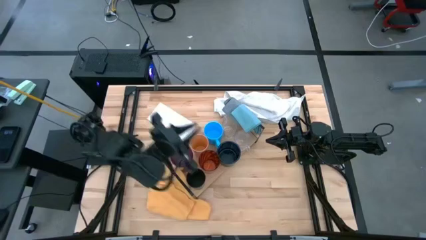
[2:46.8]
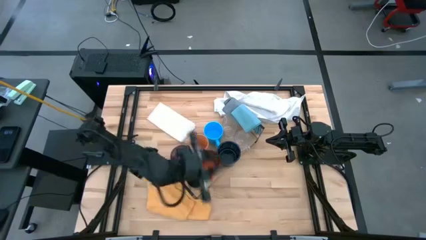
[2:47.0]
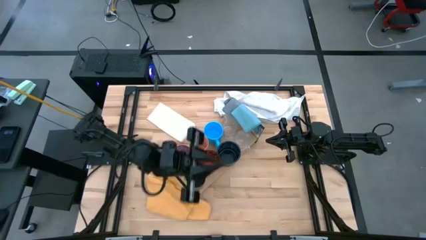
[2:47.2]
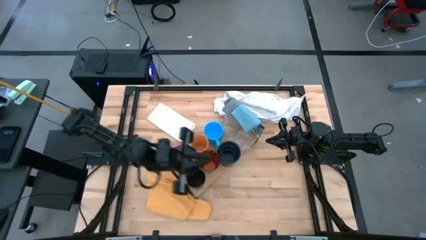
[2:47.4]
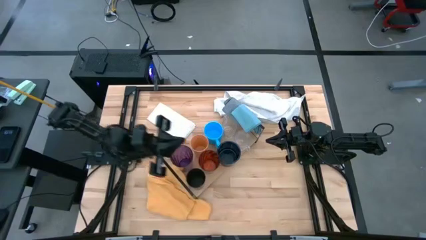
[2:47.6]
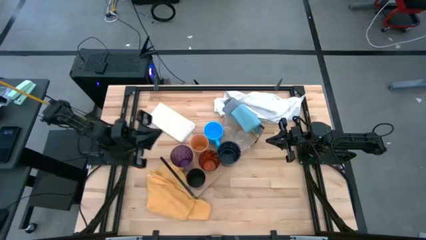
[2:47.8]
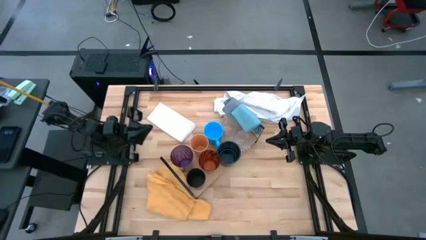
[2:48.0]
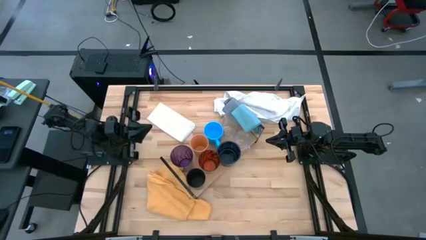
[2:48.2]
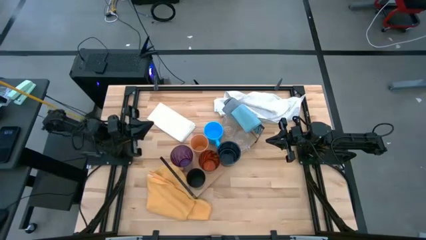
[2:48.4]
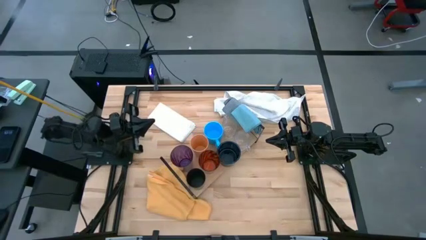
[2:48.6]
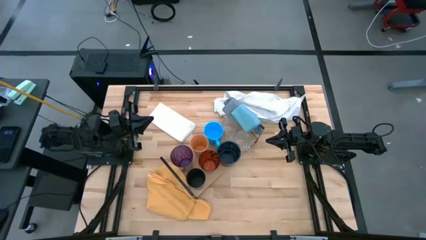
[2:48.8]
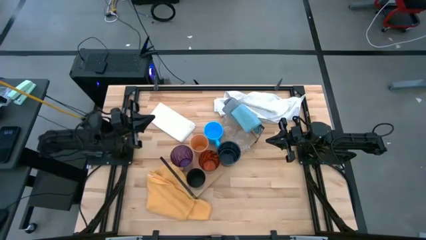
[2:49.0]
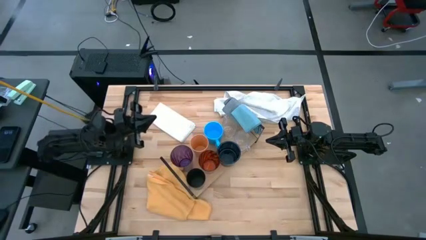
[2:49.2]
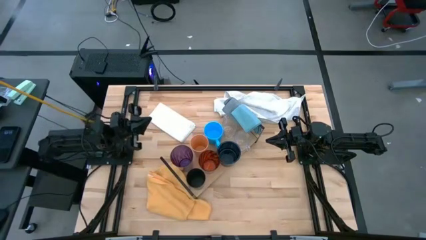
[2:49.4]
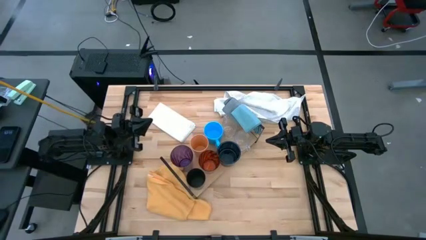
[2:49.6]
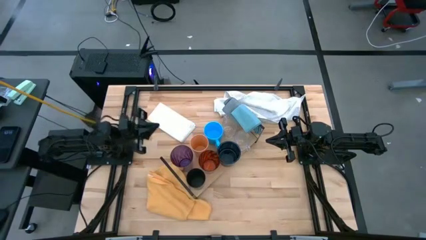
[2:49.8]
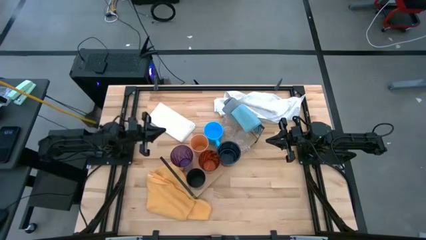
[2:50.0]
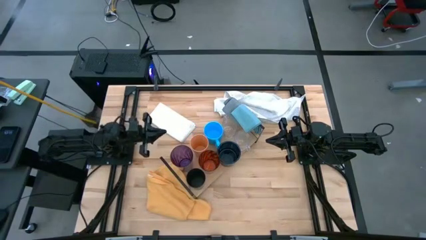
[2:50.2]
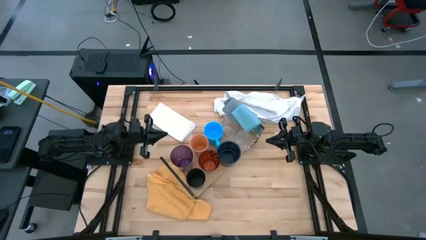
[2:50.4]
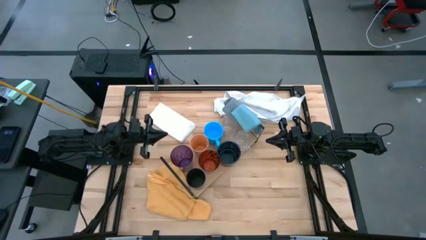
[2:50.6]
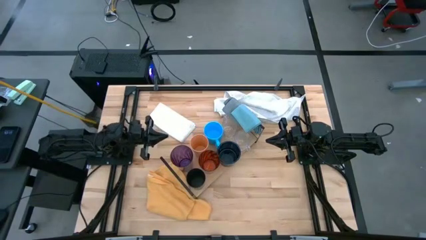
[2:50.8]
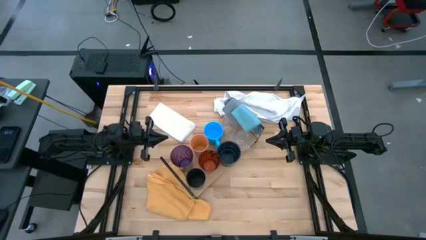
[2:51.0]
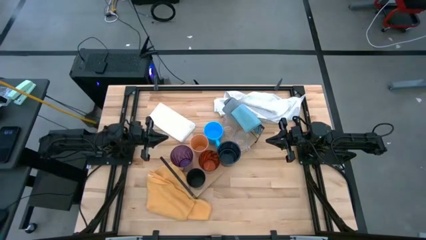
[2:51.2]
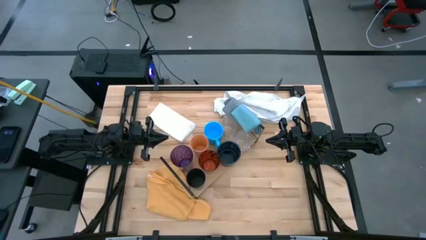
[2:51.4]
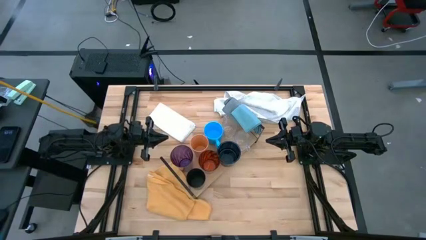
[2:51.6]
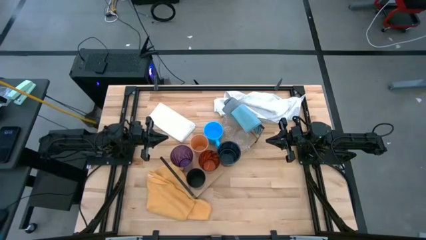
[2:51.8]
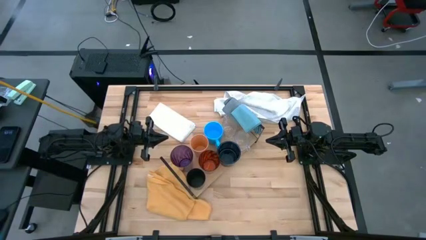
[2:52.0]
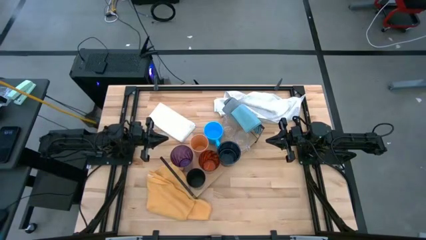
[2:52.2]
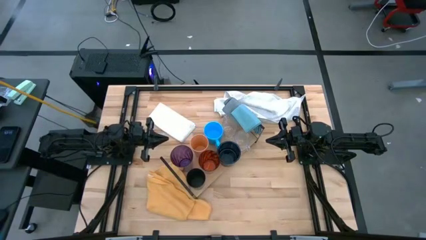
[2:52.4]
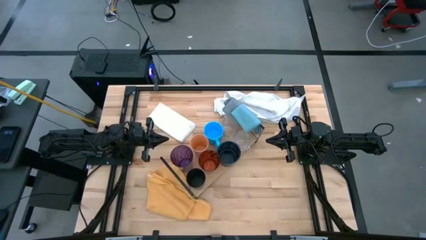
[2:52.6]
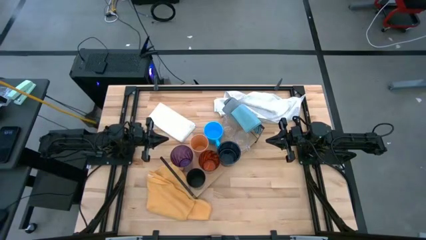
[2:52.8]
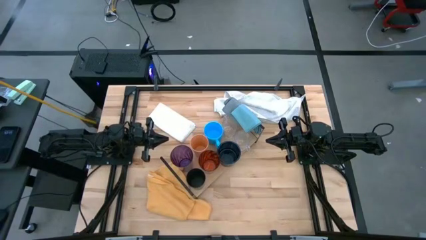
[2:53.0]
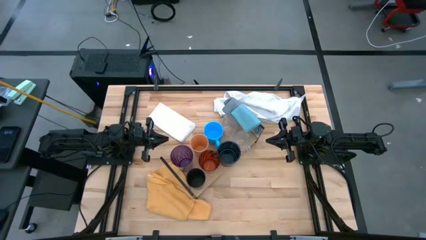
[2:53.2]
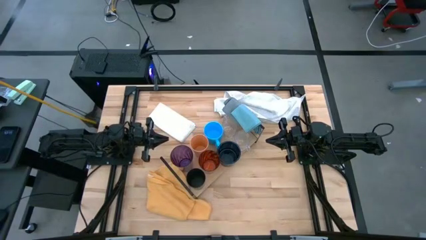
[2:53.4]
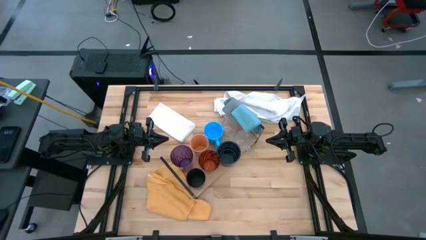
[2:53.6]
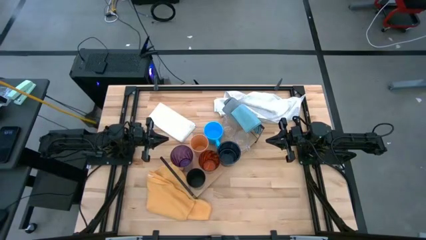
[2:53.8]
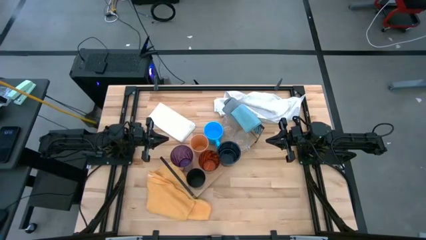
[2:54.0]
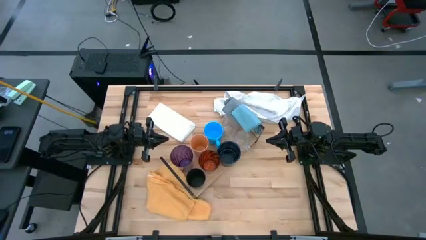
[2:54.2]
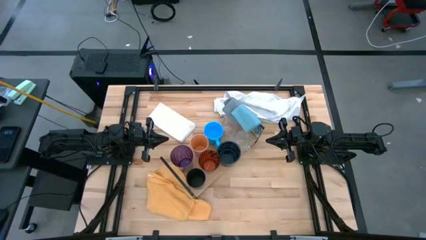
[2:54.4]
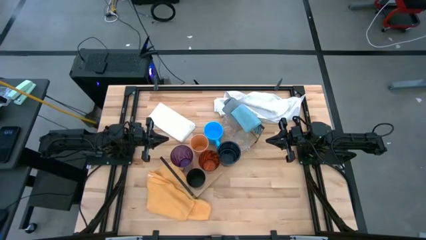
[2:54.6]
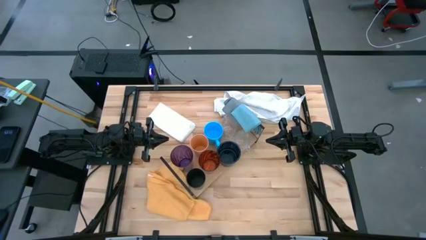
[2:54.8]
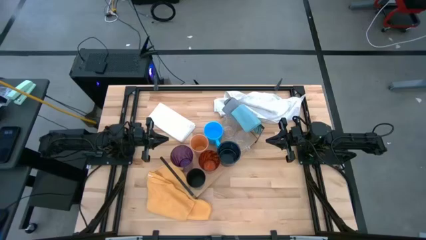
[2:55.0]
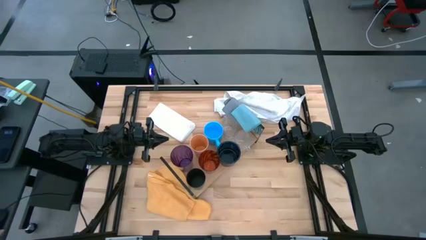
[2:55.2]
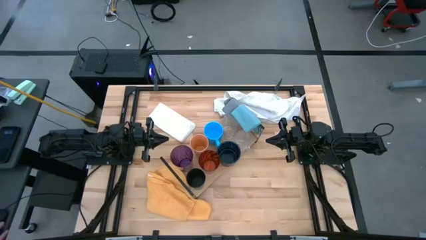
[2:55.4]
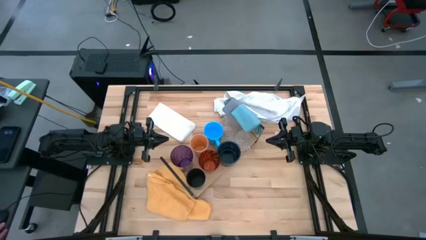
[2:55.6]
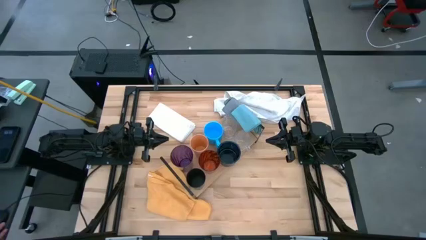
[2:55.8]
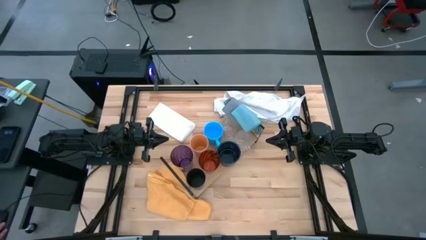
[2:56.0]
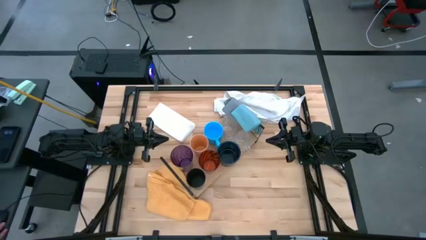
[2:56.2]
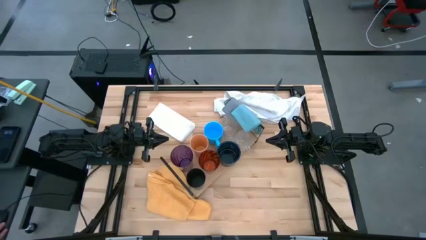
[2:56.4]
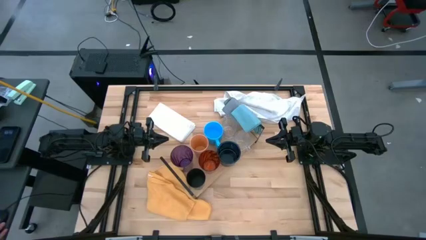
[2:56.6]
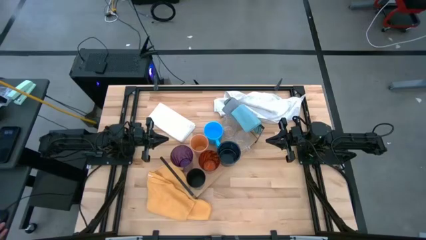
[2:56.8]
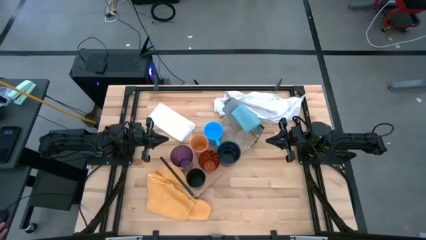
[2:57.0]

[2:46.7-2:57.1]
Task: Stack small to large cups/mugs on shelf
Return to Home Position

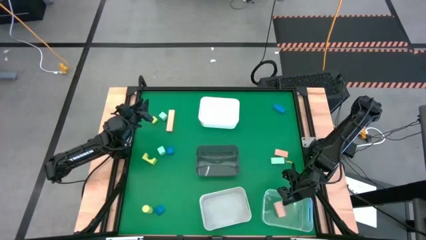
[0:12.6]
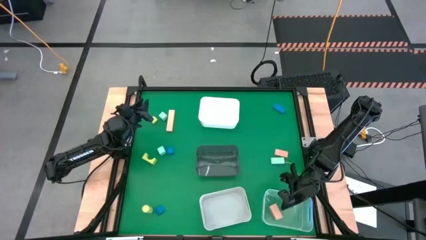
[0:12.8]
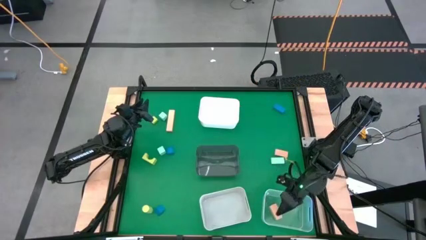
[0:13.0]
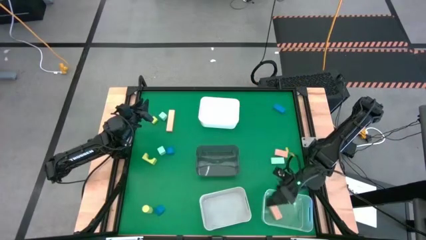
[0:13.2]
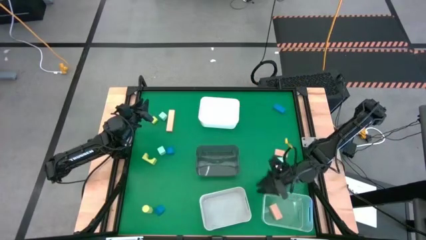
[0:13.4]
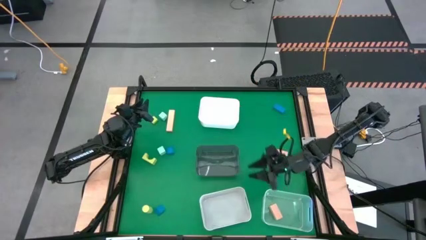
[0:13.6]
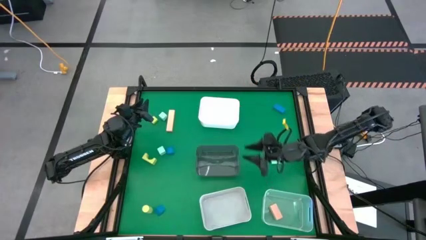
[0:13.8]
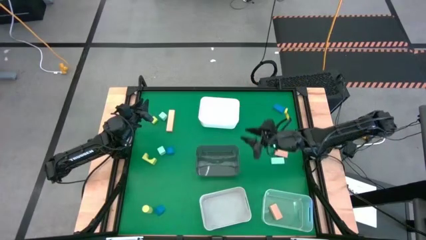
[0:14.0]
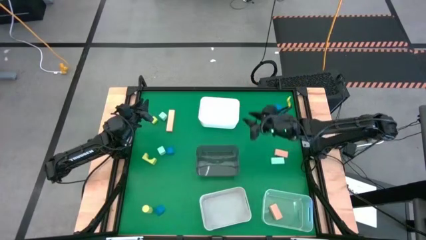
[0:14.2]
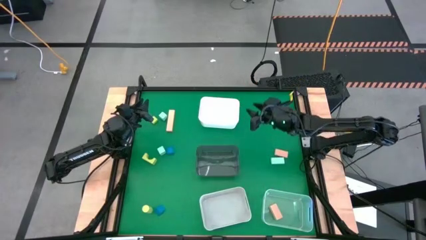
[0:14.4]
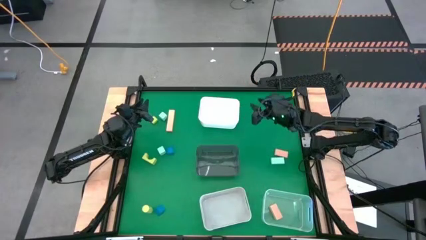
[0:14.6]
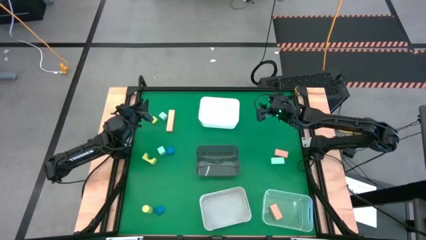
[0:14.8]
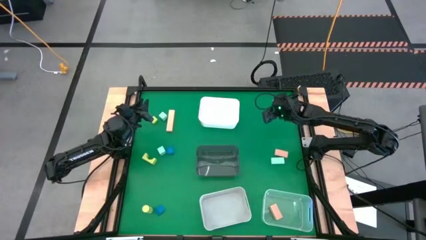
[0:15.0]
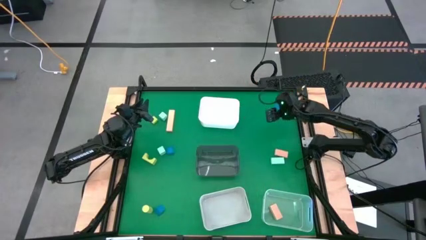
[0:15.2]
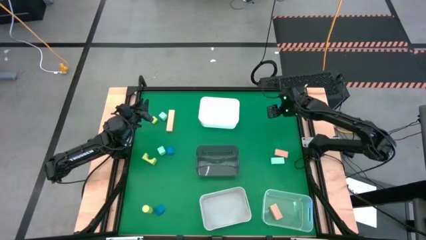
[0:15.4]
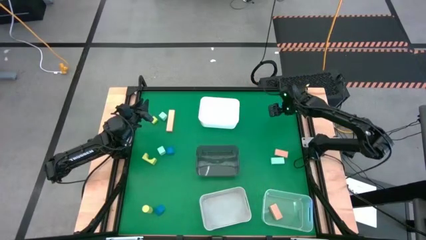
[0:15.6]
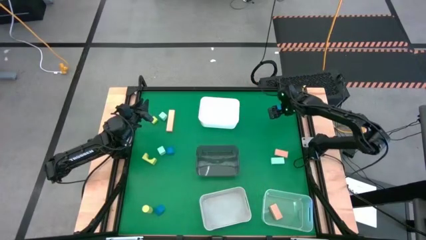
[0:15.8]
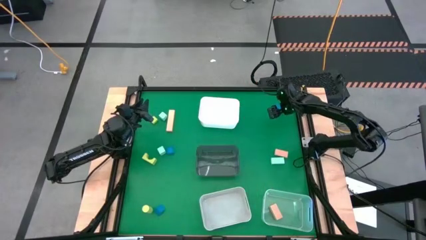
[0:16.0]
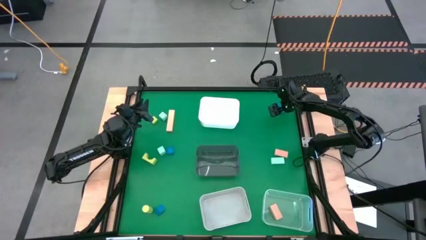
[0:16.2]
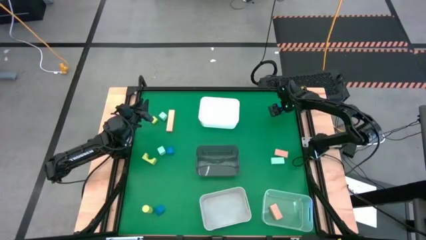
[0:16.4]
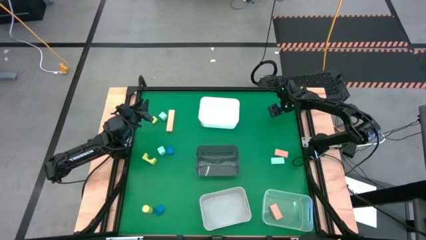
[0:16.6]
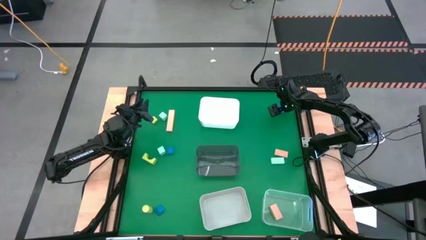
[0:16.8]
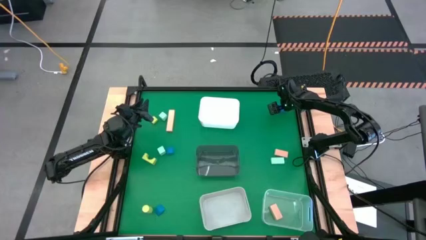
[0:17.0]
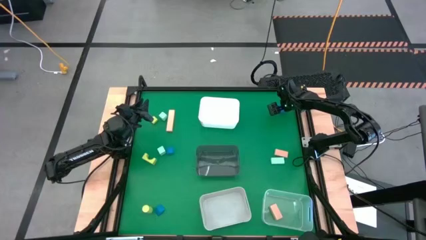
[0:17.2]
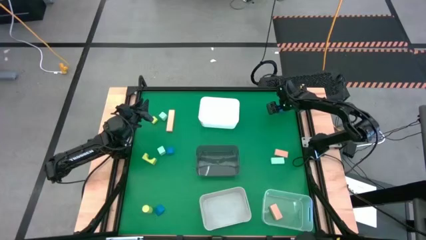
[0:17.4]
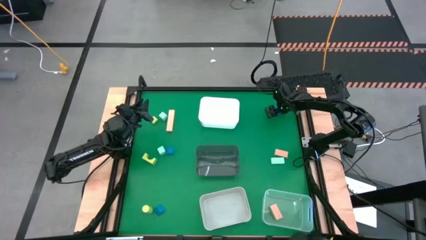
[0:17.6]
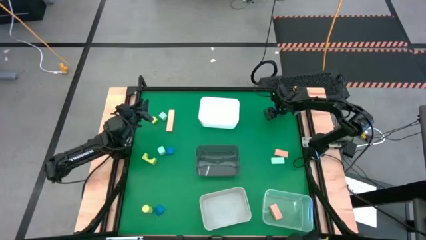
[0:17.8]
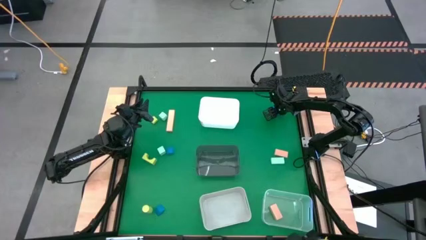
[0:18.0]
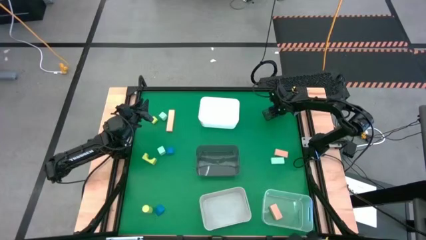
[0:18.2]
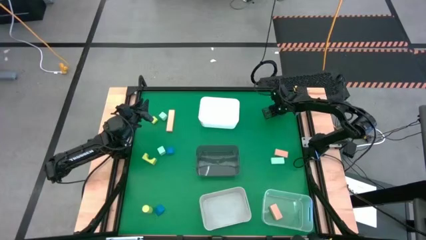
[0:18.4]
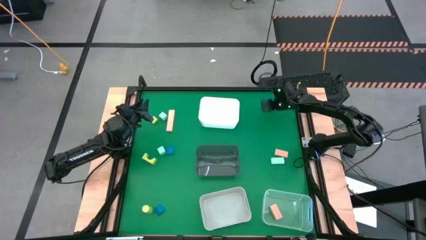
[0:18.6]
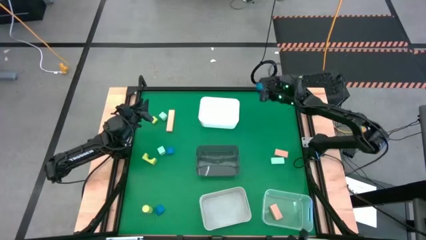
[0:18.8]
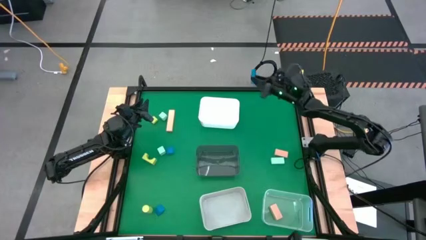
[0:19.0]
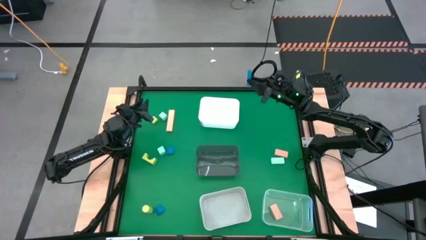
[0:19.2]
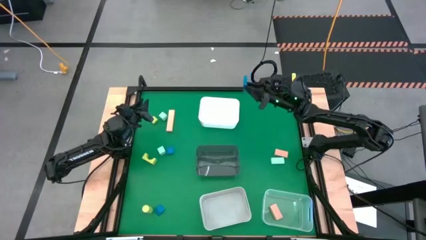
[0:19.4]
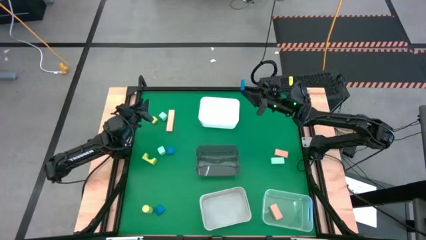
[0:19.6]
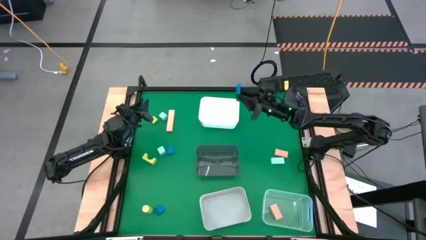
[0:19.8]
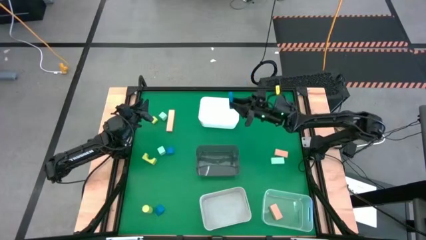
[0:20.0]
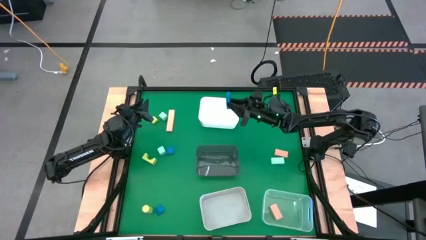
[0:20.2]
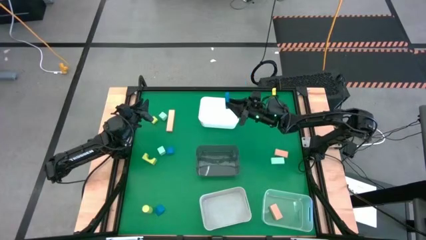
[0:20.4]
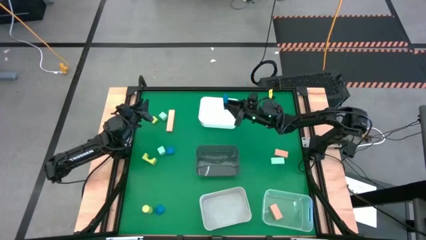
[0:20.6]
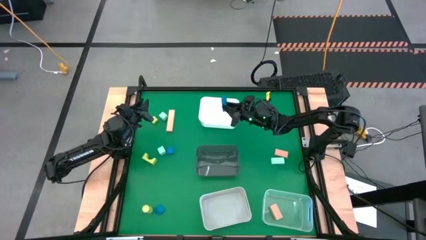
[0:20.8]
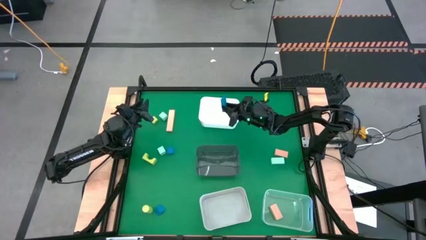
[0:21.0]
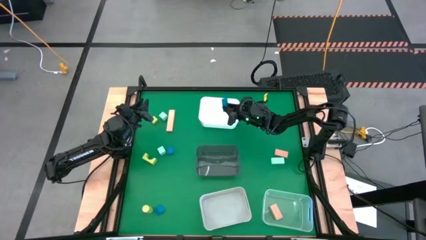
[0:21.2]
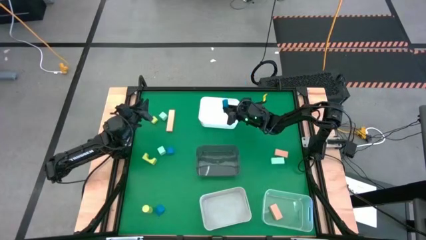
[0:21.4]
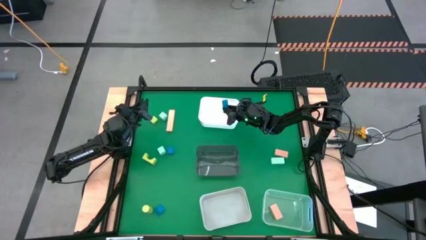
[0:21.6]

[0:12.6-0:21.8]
Task: Sort & place blocks by color
Put the top blue block into the white bin
